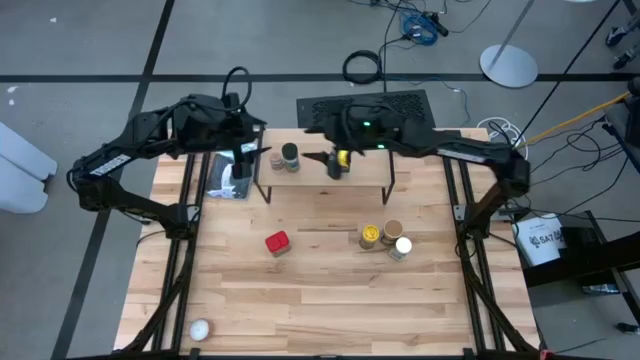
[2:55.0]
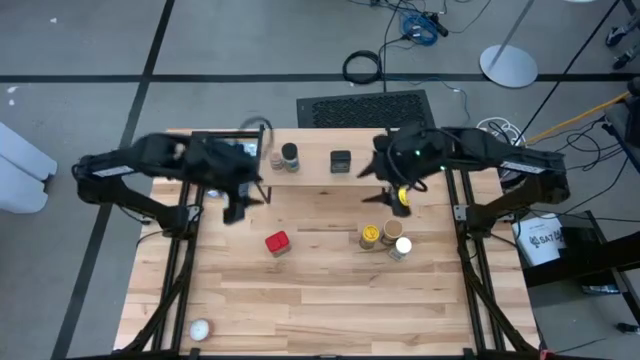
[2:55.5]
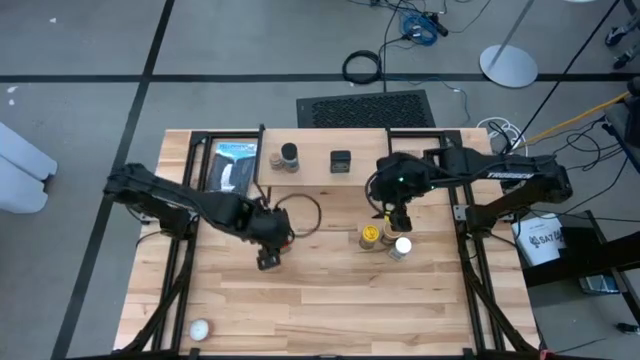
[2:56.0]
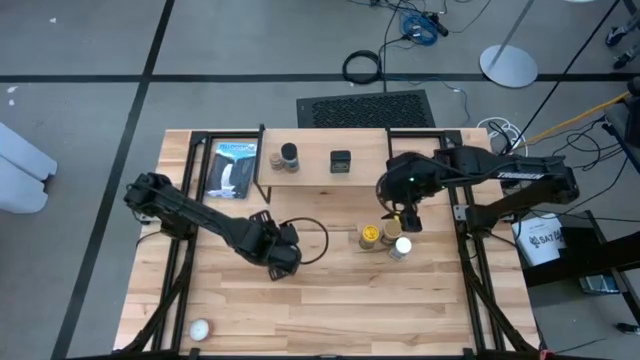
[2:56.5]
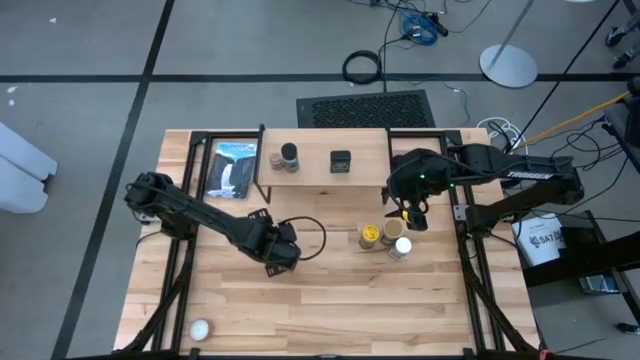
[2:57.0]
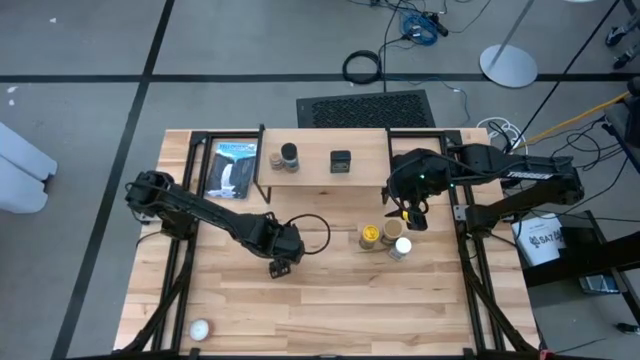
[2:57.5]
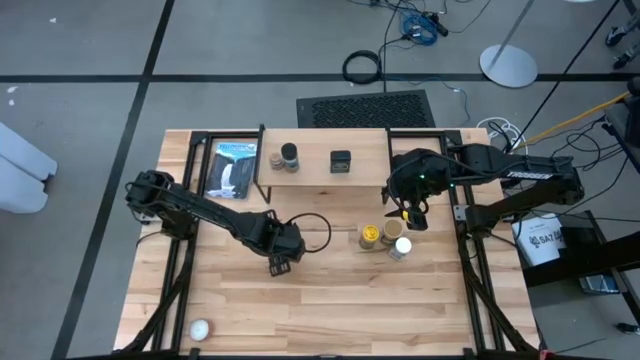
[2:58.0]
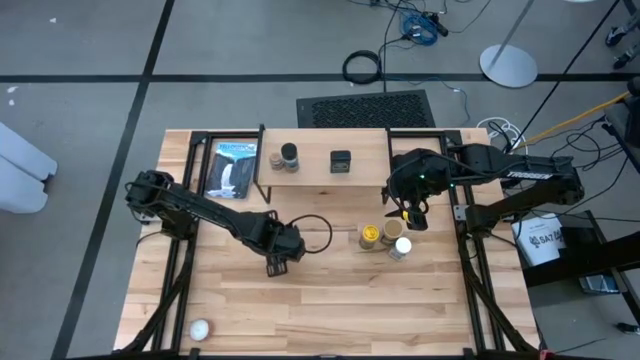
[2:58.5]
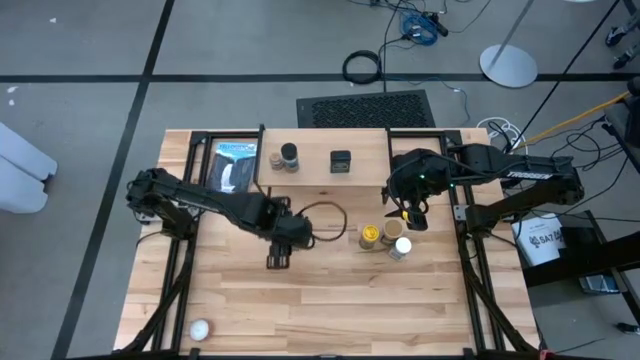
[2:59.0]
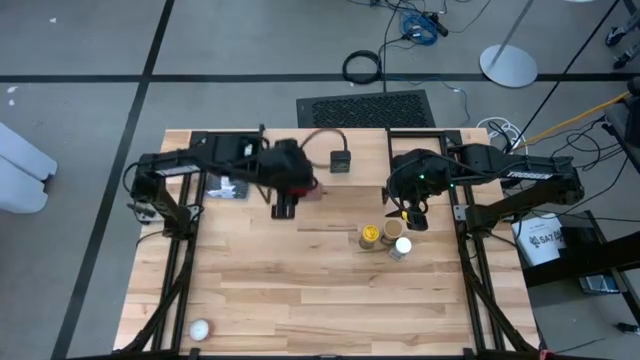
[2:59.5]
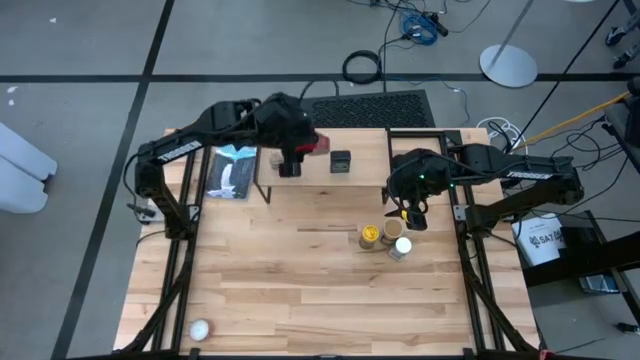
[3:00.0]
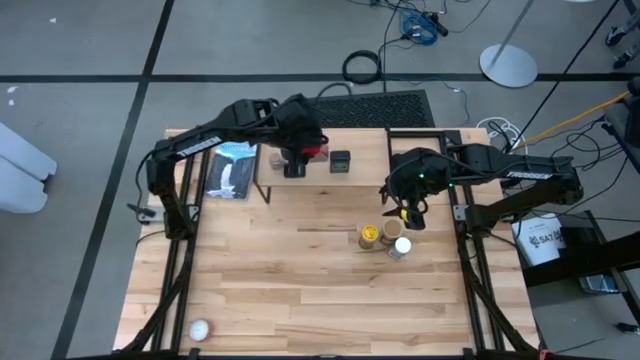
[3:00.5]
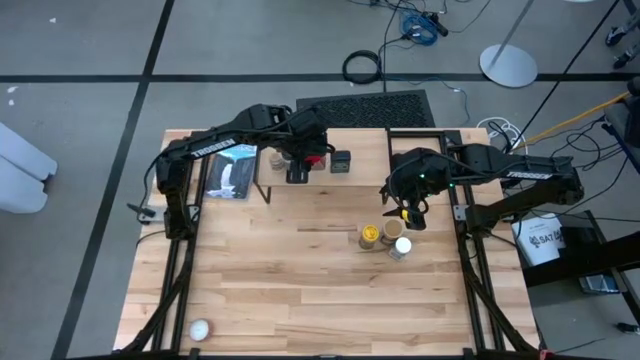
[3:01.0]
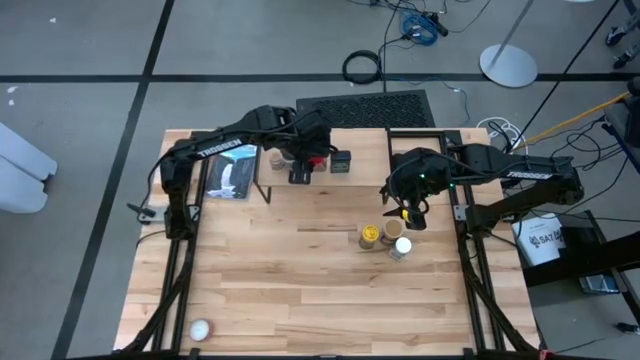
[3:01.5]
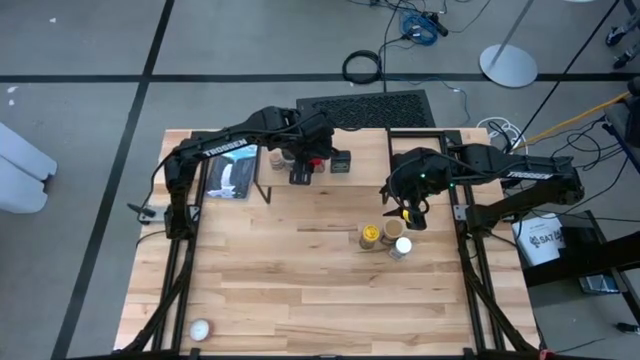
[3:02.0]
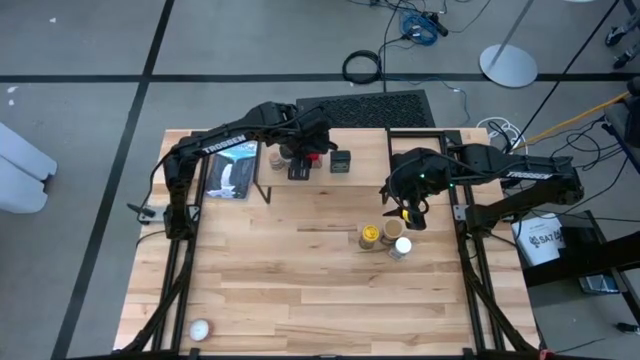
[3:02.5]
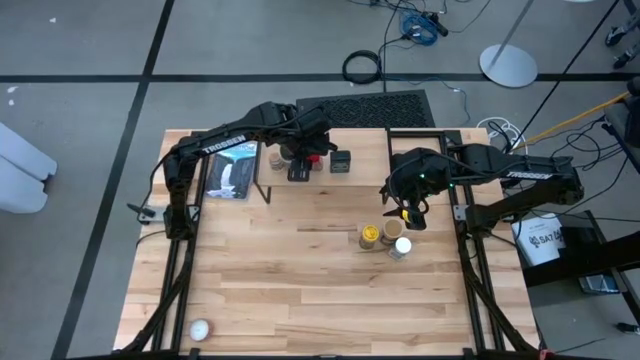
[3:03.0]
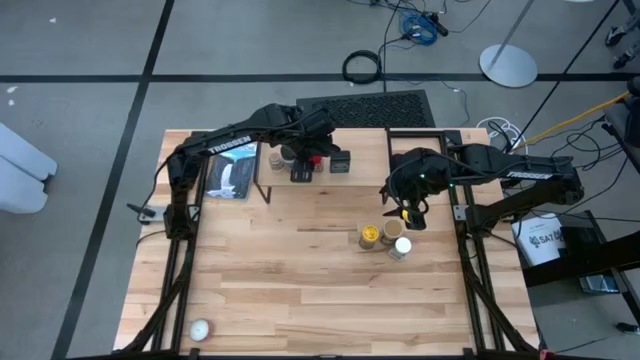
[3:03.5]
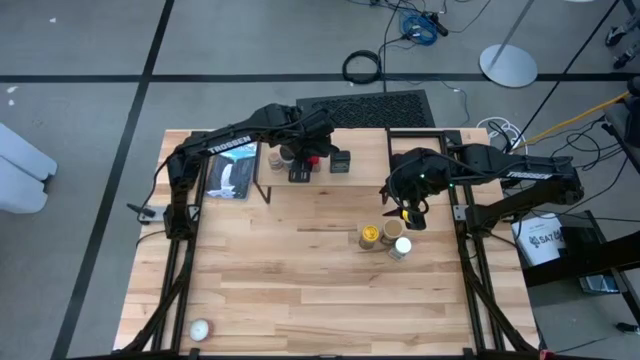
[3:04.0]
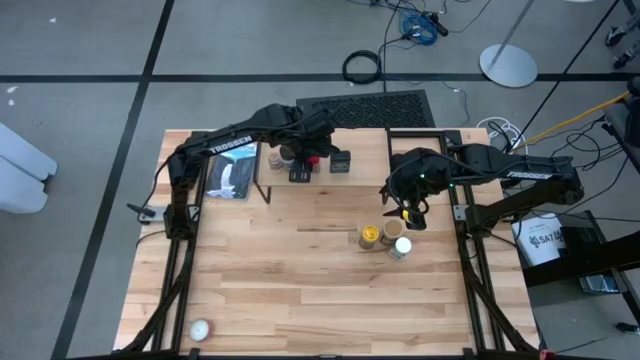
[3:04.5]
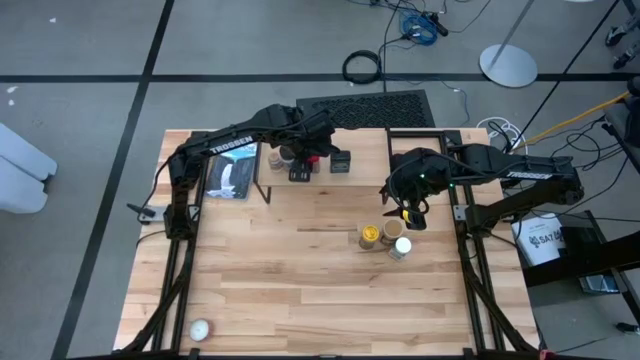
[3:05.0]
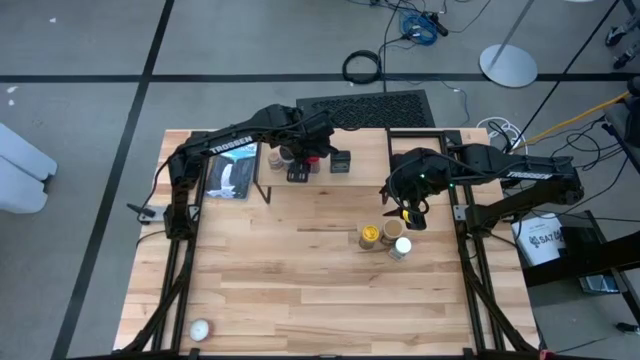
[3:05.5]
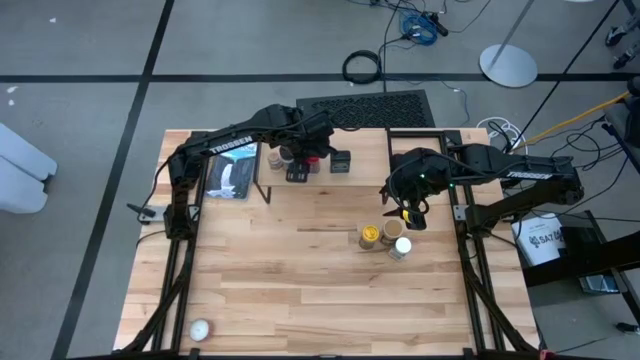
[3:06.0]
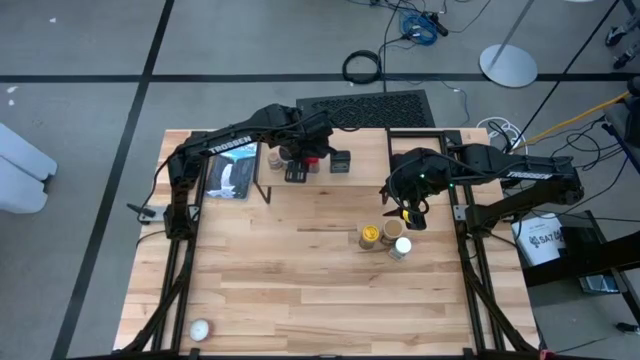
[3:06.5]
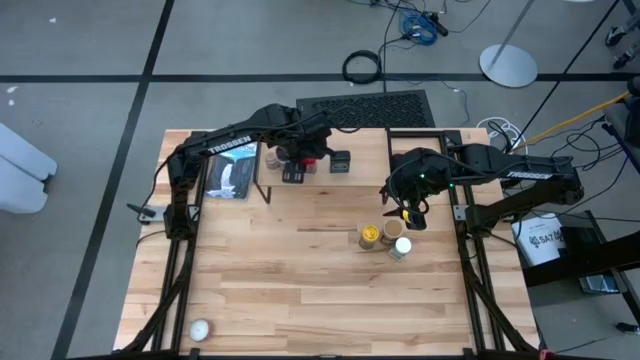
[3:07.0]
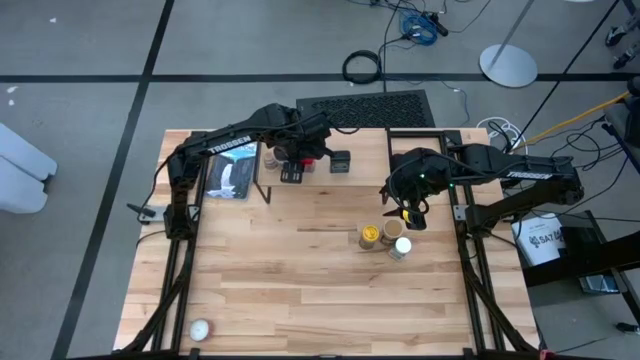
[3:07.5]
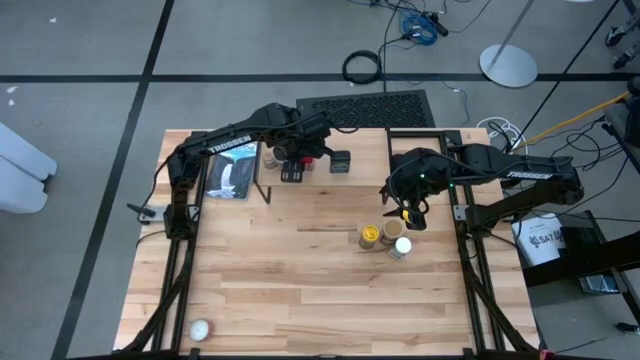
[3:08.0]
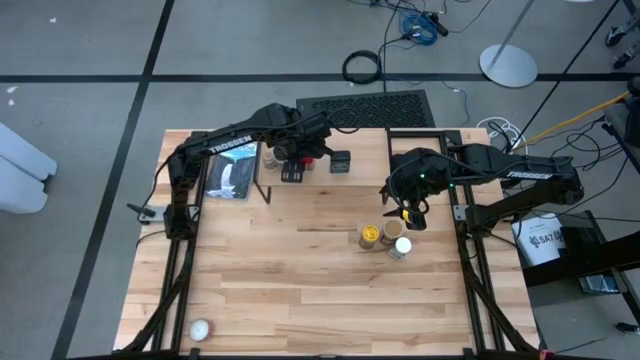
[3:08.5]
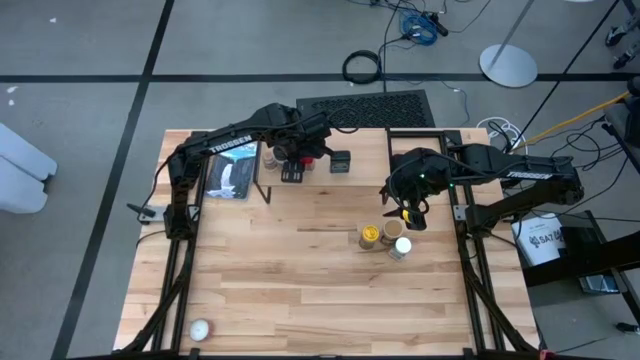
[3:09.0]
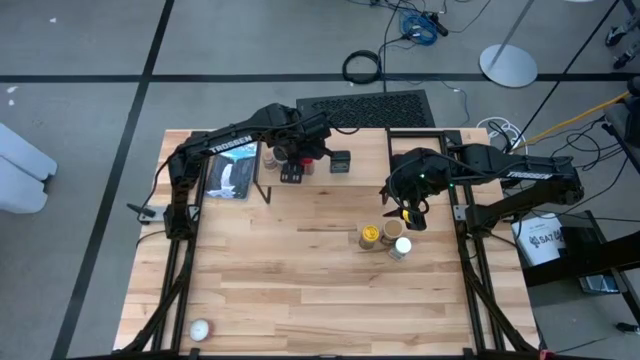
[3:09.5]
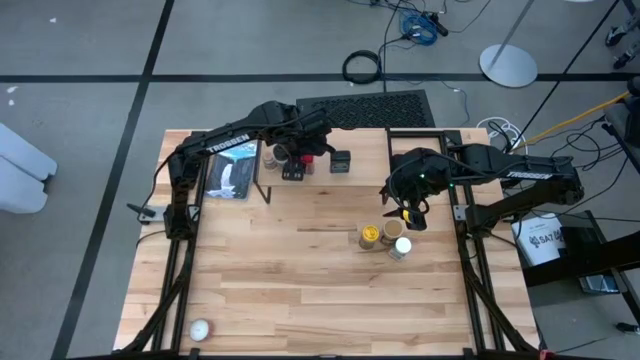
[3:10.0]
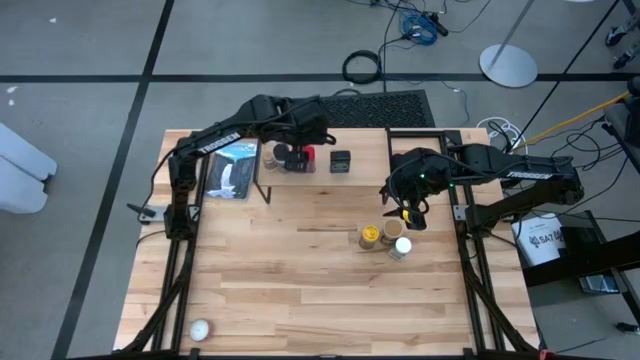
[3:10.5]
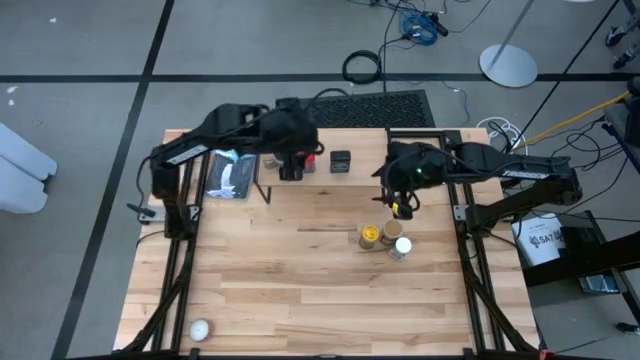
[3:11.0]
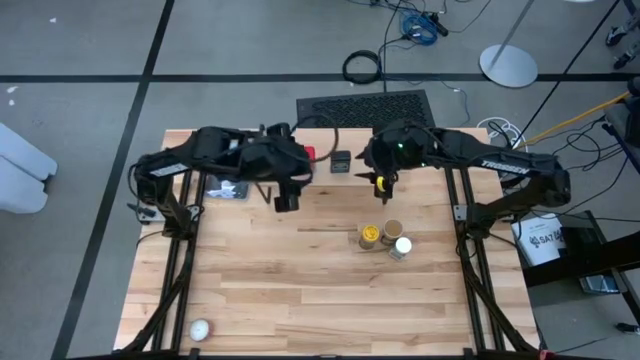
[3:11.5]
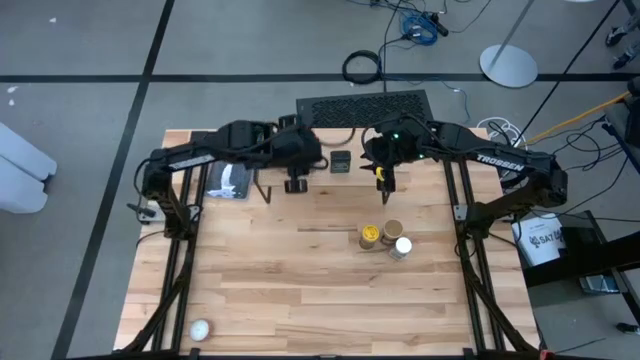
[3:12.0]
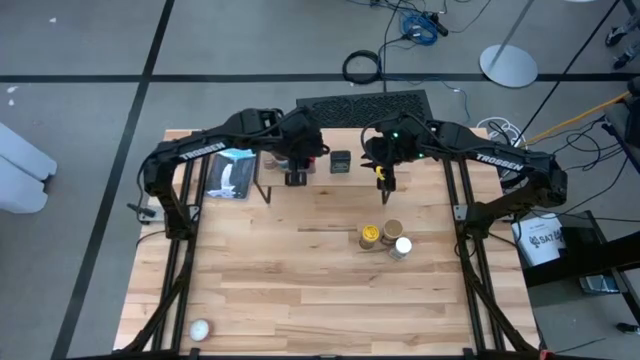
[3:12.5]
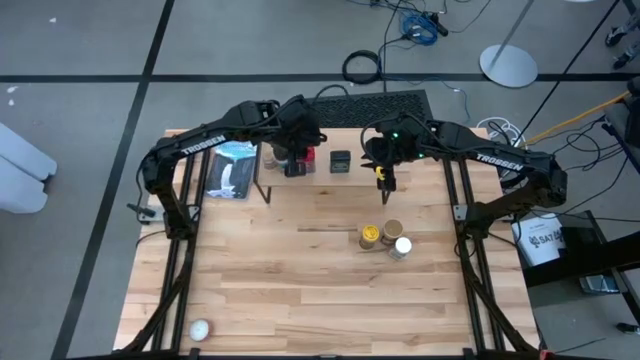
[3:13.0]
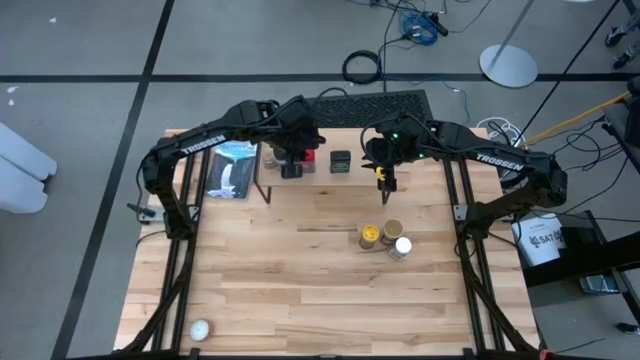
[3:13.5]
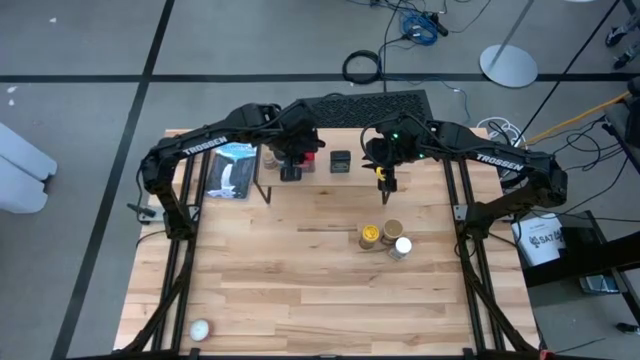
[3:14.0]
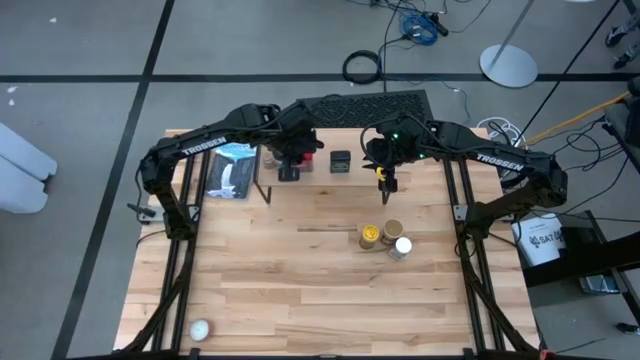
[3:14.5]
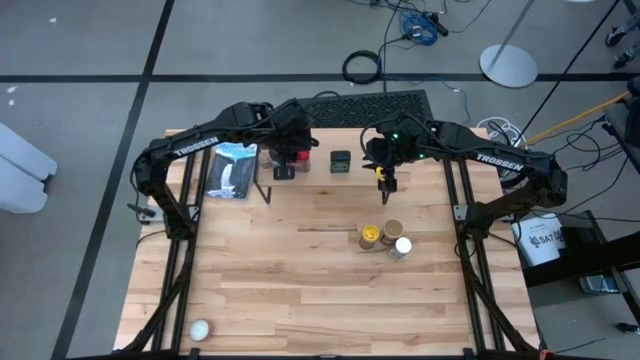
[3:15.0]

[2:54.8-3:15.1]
Task: Shelf spices
Put the red seasoning can on the shelf

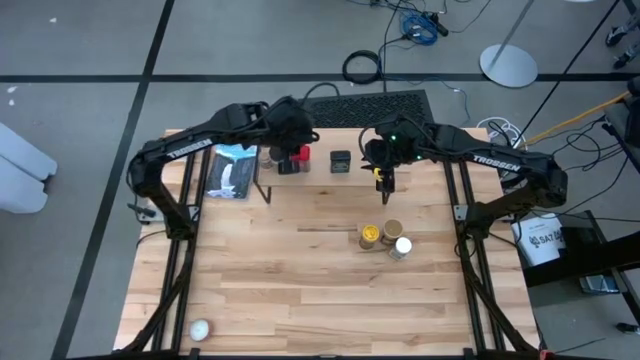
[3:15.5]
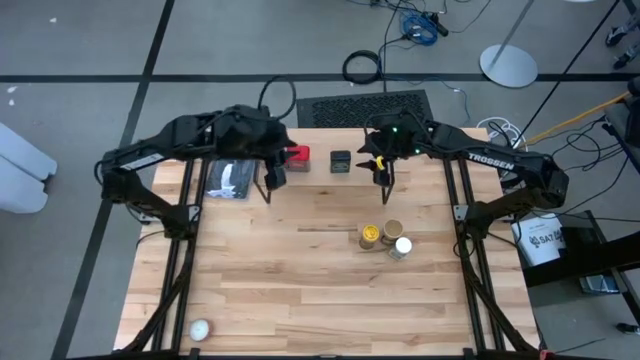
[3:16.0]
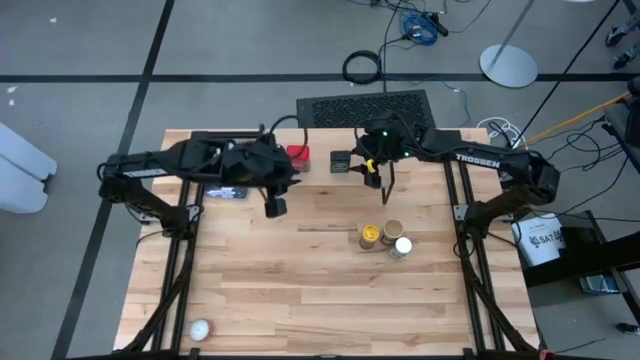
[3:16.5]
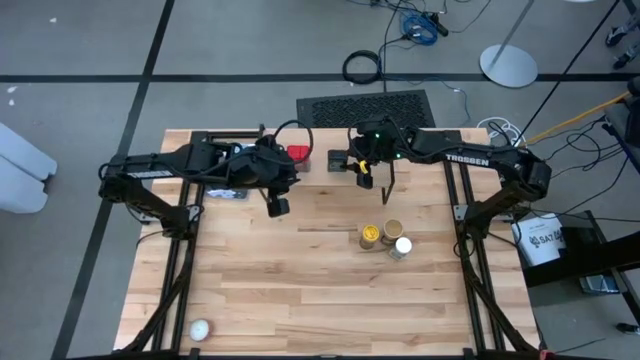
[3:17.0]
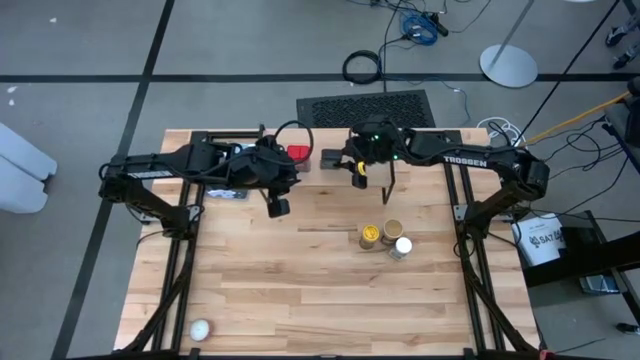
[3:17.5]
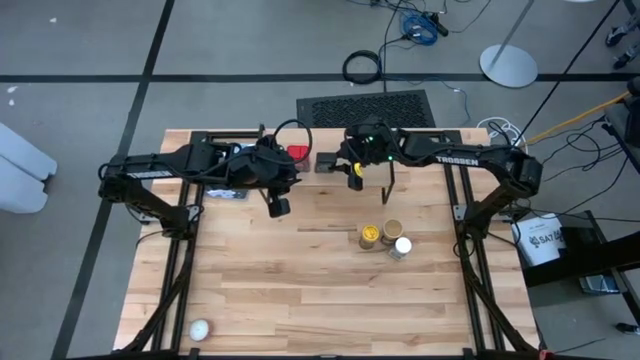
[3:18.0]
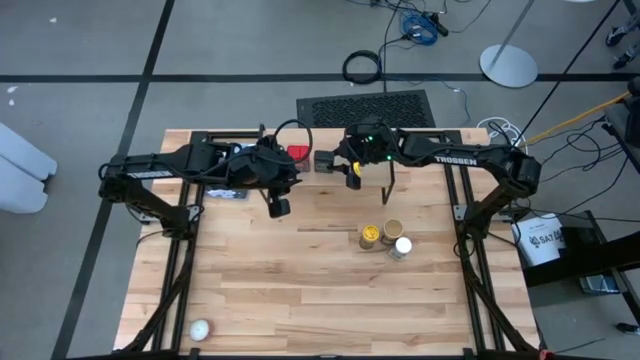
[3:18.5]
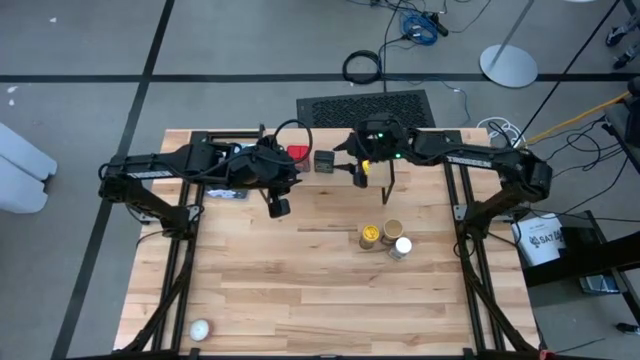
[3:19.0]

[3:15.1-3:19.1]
Adjust the black seasoning can on the shelf
